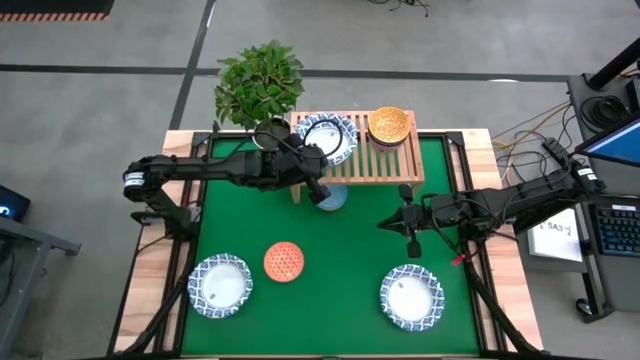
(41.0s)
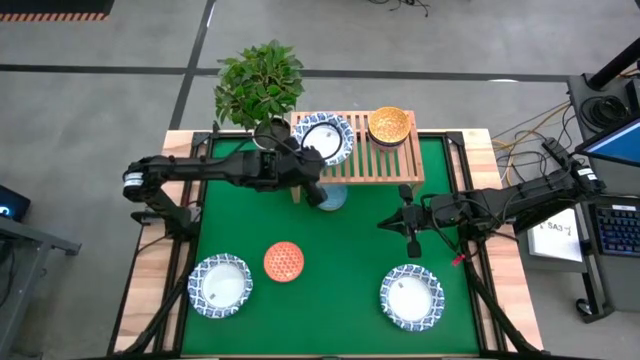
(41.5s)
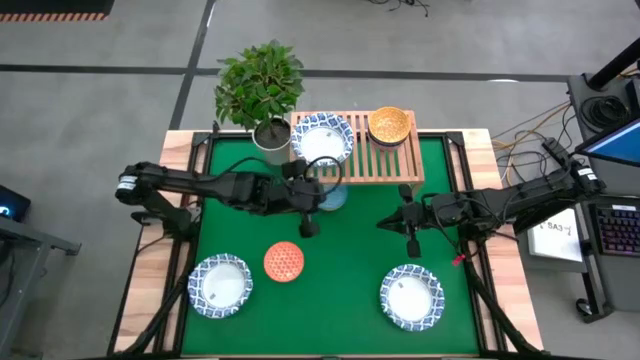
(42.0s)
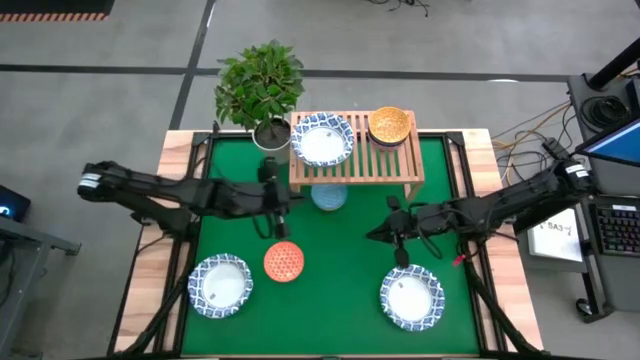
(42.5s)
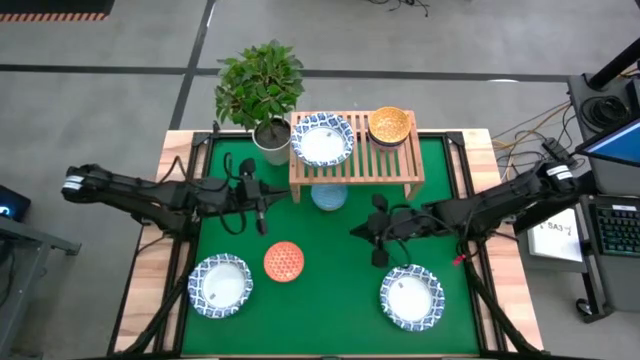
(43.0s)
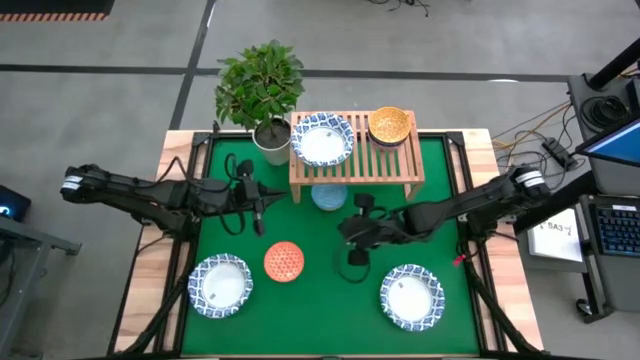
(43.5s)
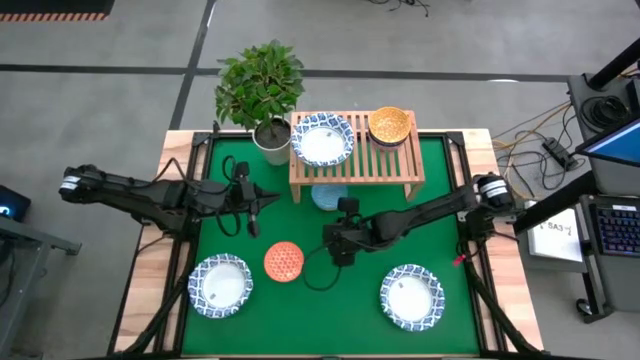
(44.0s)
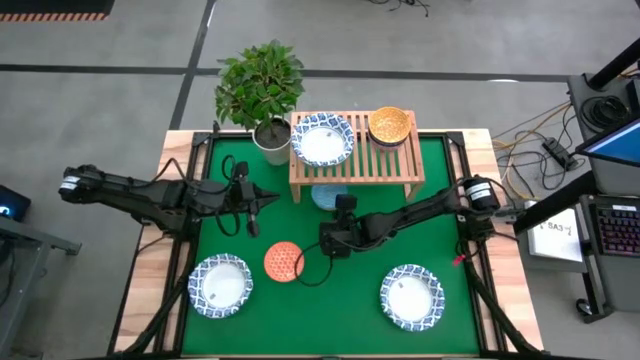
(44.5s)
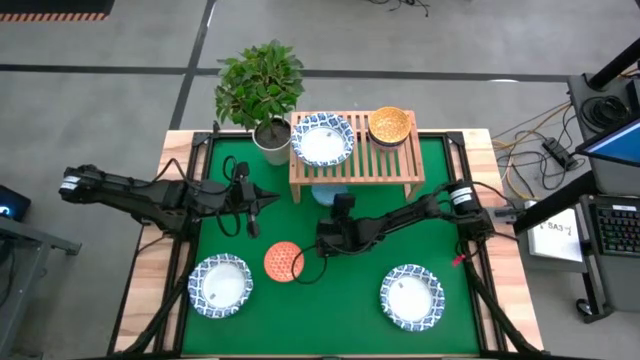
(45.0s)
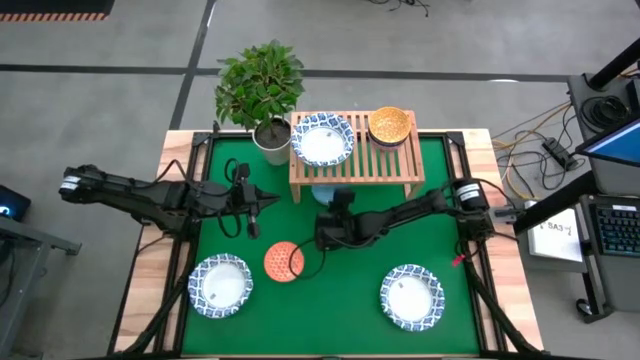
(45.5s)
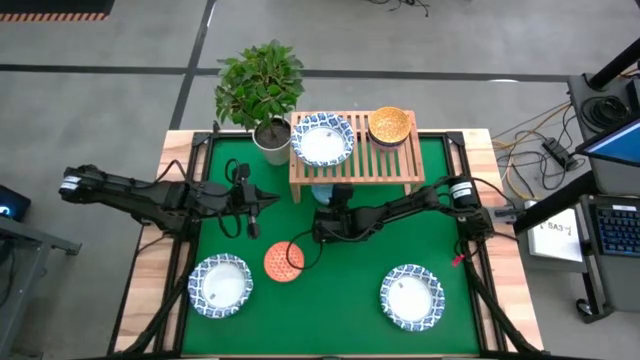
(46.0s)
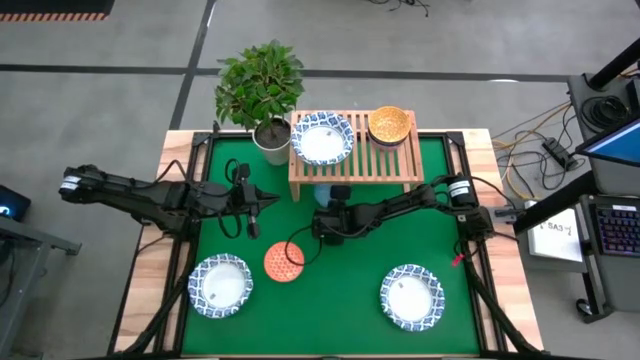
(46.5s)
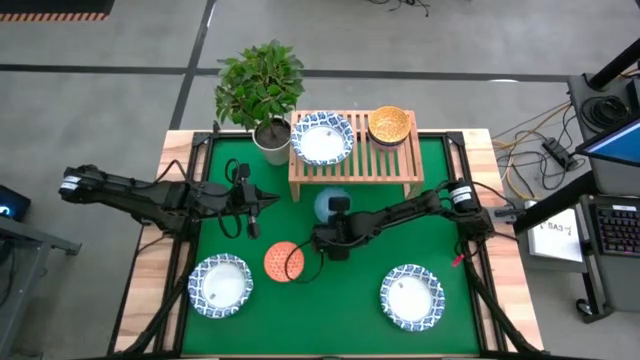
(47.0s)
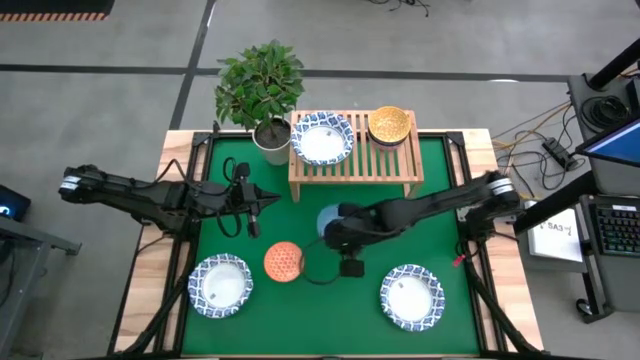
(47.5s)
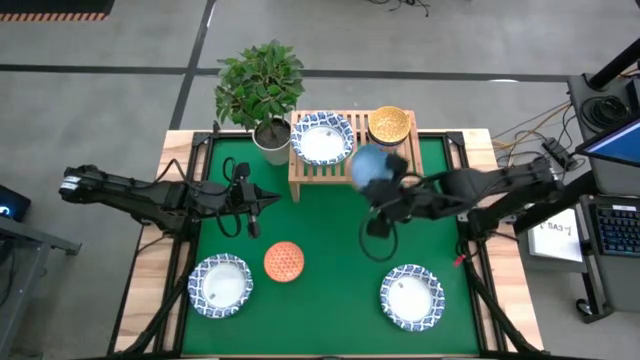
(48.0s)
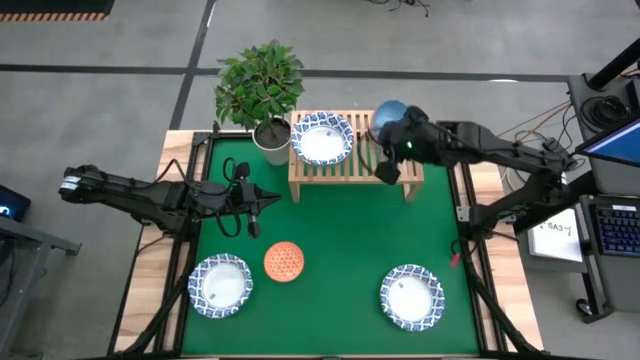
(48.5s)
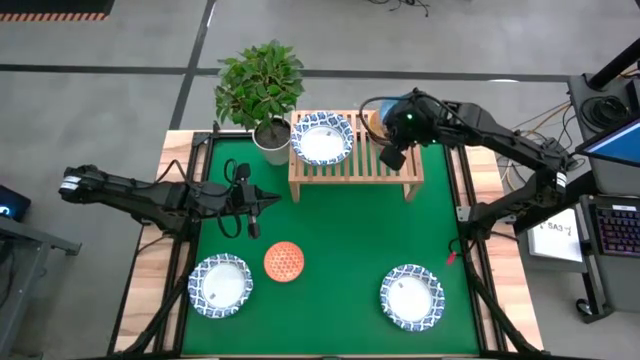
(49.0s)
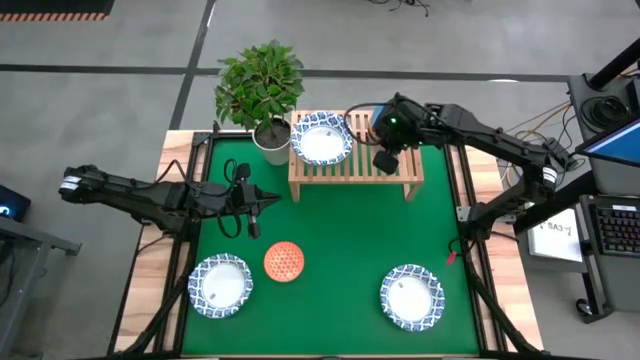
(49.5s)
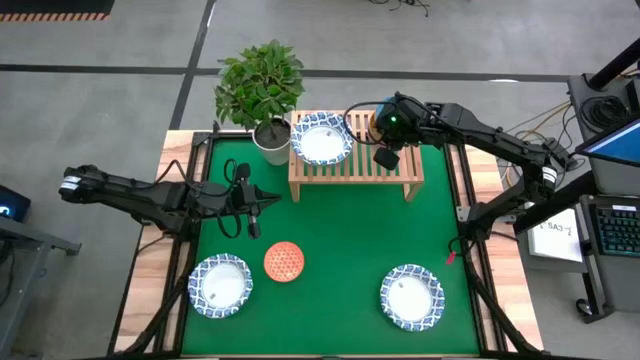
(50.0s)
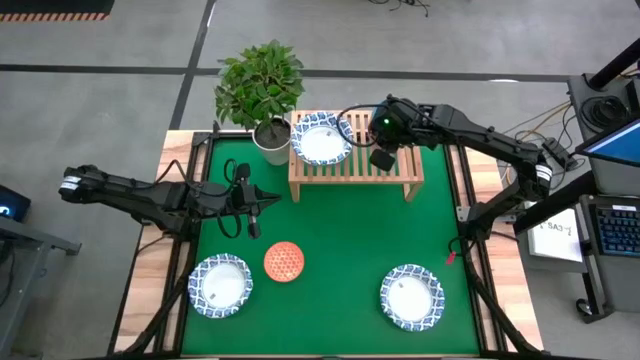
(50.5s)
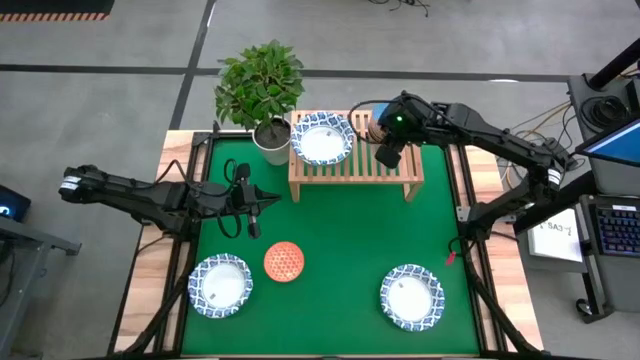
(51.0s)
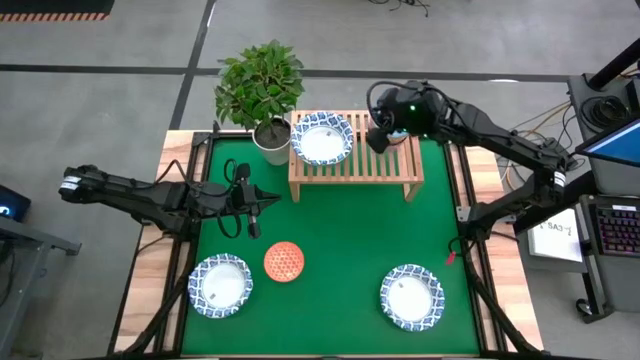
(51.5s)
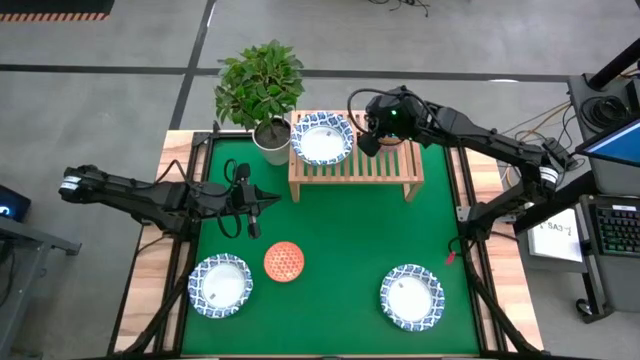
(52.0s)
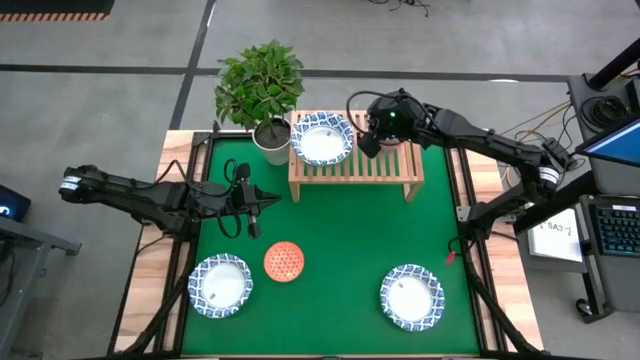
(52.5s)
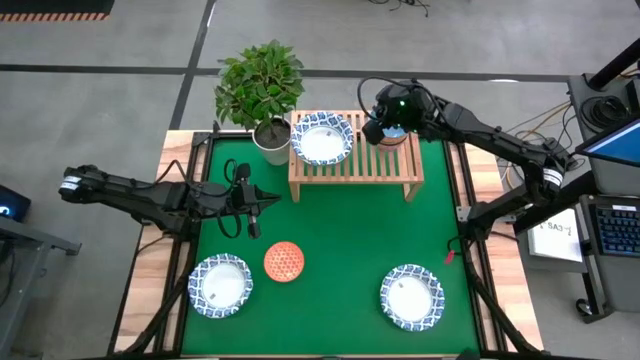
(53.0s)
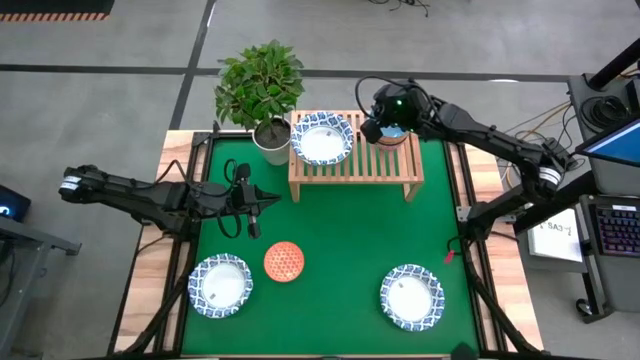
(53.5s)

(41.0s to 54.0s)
Task: Place and stack bowls onto a shelf
Stack the orange patterned bowl on top of the blue patterned bowl on the shelf

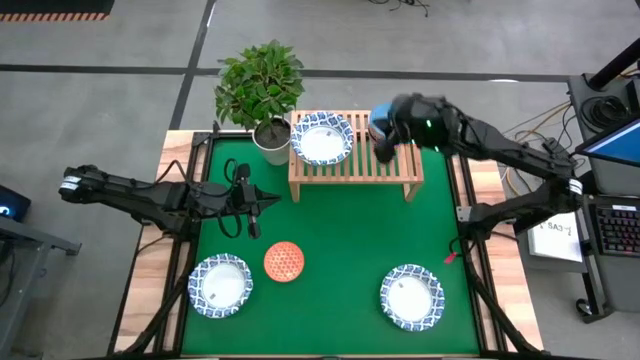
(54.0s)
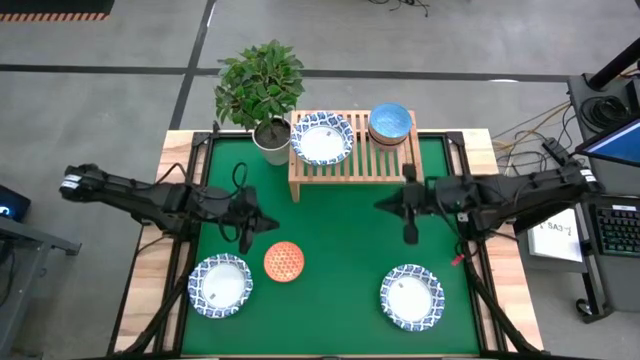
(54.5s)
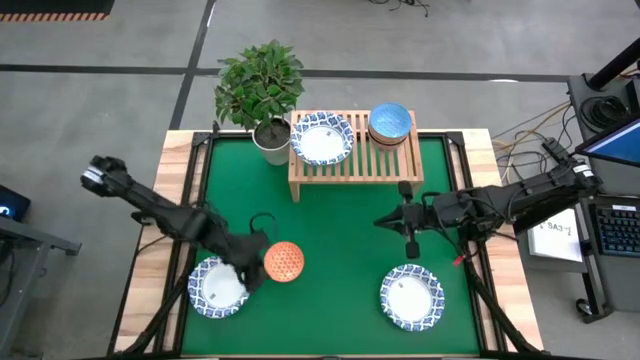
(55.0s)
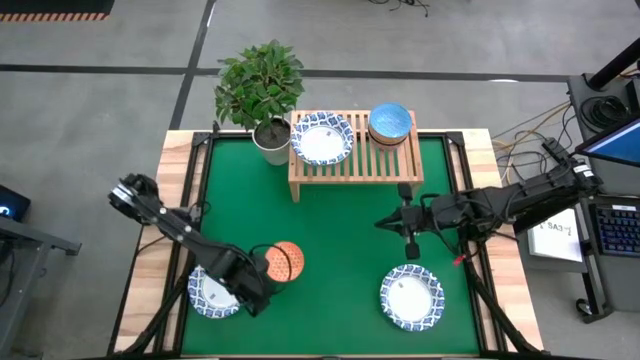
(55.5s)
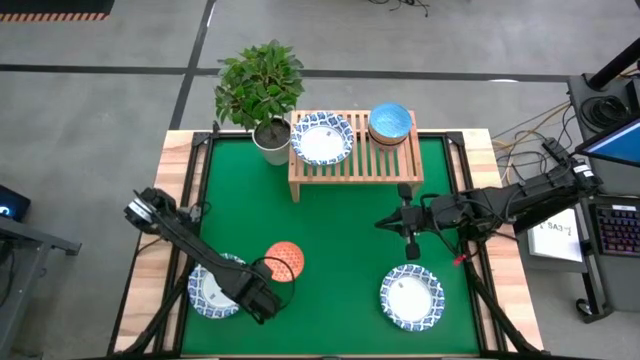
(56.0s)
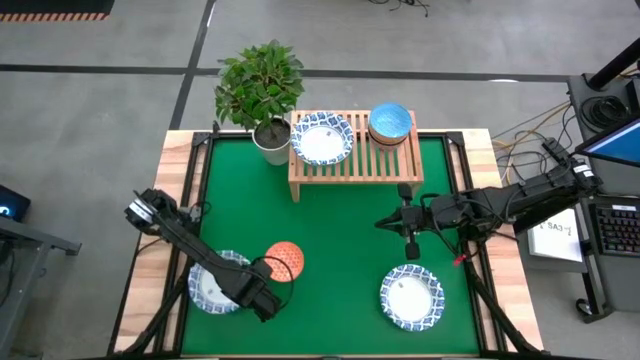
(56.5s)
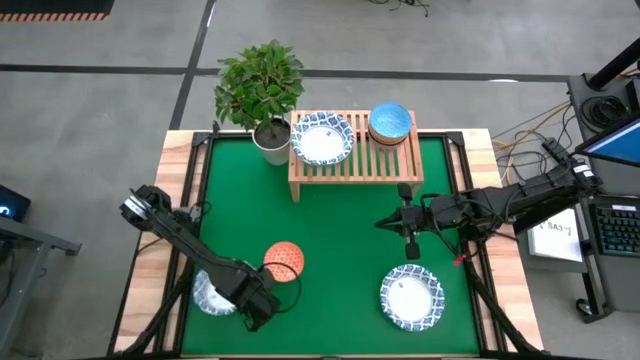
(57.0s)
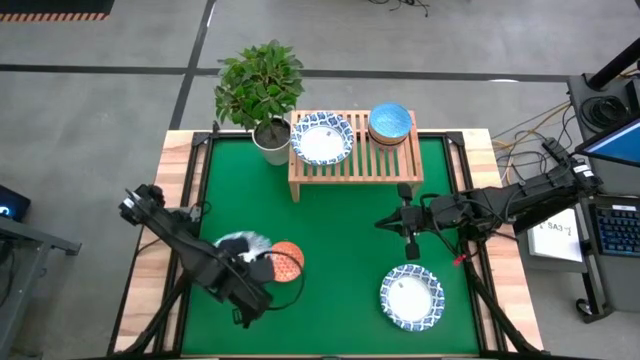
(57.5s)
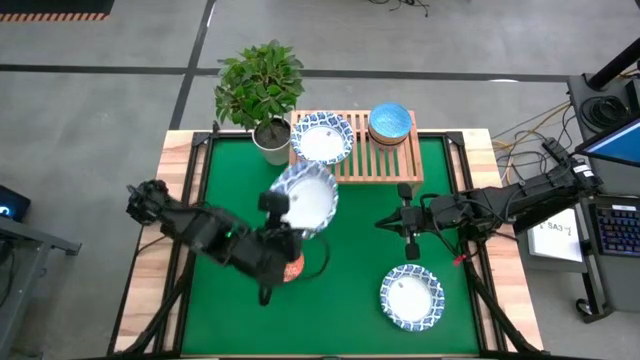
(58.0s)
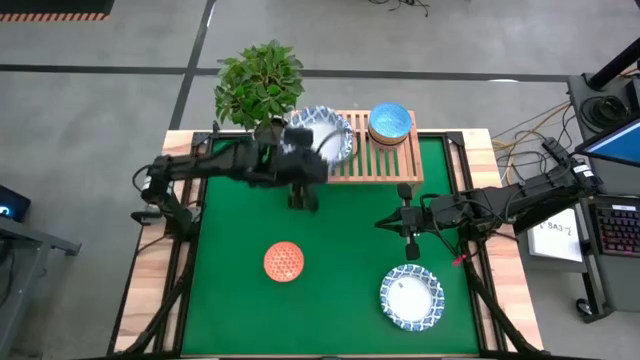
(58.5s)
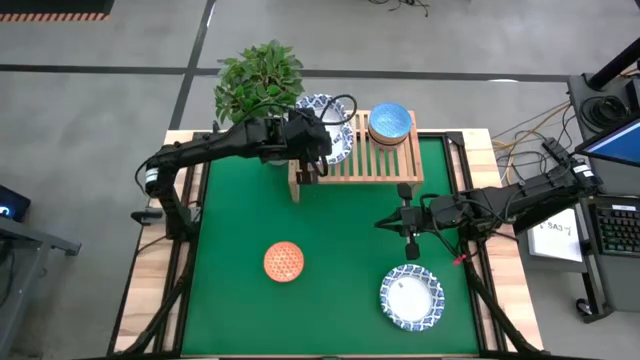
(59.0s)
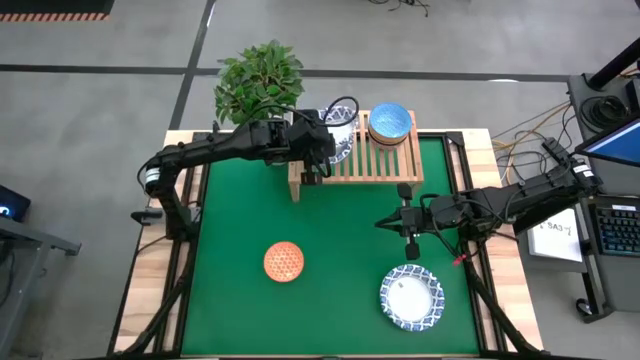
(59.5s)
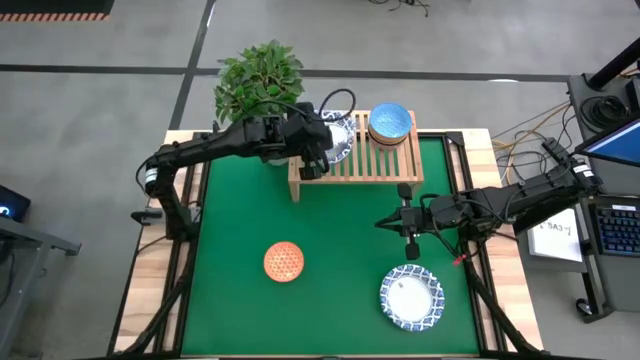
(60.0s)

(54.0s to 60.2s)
Stack the white patterned bowl on top of the white patterned bowls on the shelf

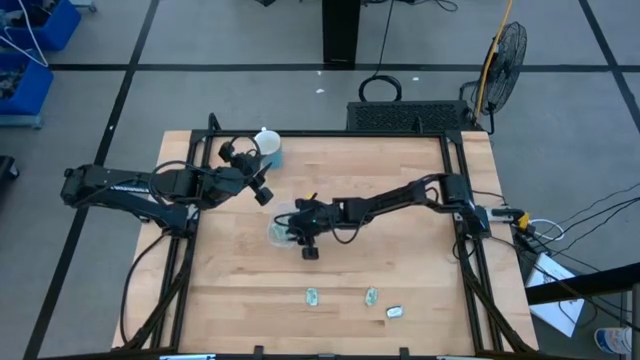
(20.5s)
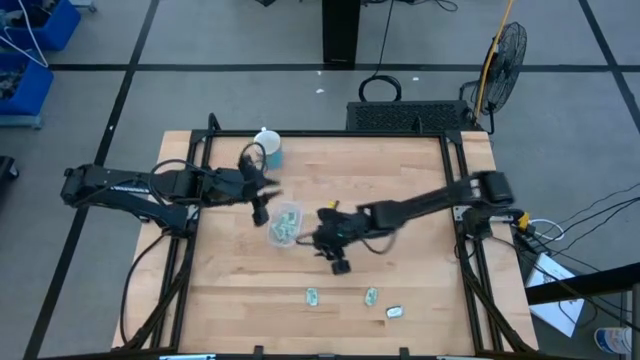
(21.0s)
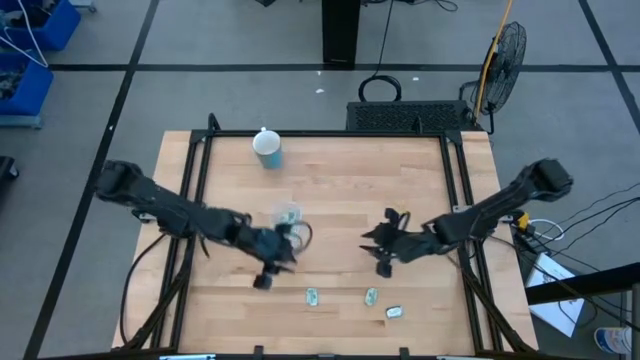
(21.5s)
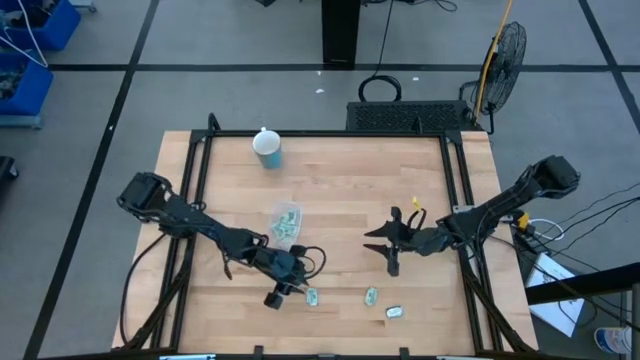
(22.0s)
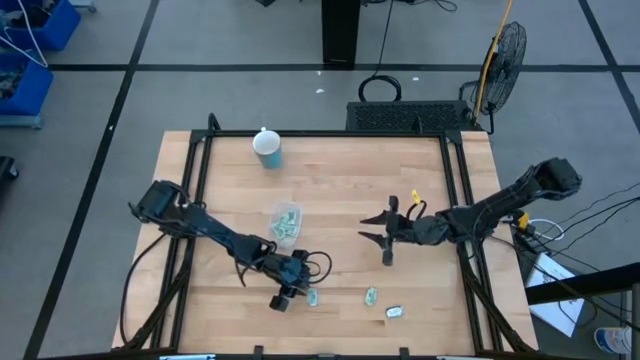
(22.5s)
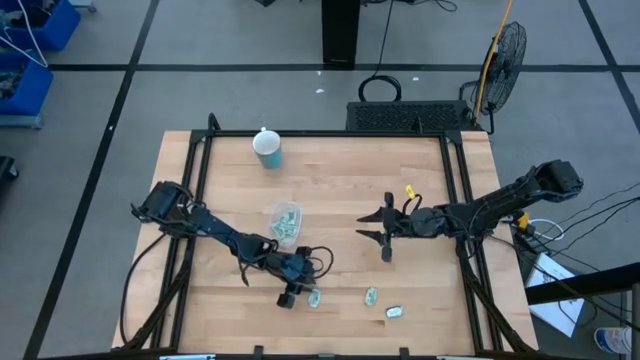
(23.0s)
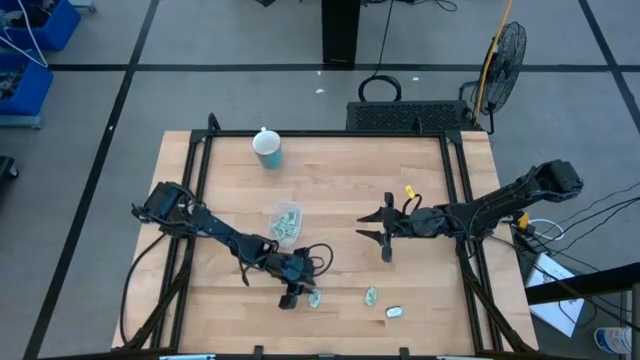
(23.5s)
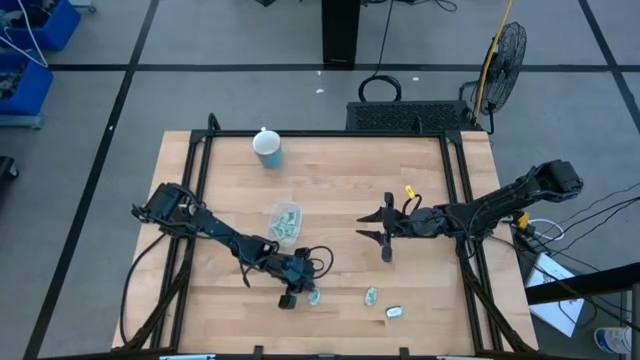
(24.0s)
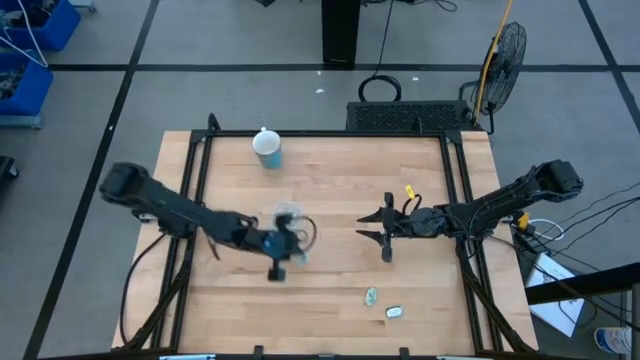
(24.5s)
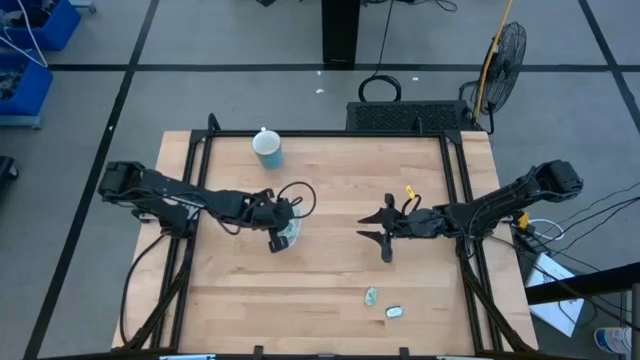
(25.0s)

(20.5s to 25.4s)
Task: Pick and place Stevia / Truvia into bins
Put the light green stevia packet into the transparent container
